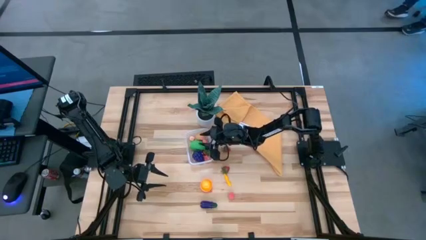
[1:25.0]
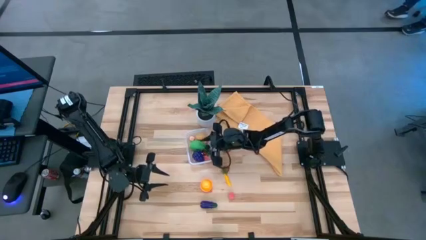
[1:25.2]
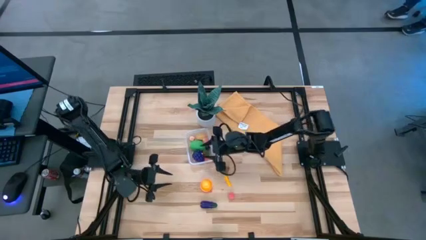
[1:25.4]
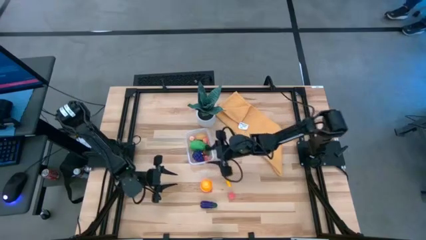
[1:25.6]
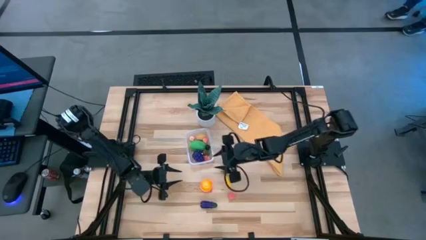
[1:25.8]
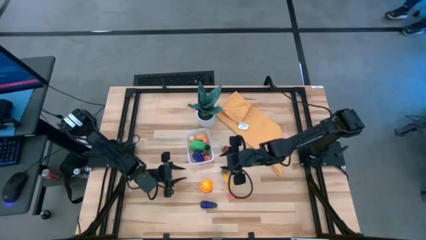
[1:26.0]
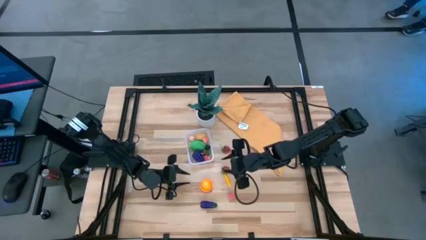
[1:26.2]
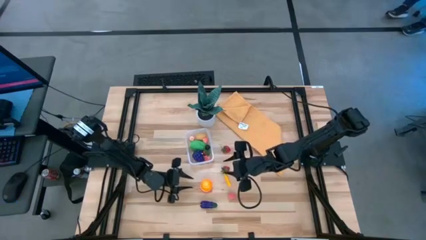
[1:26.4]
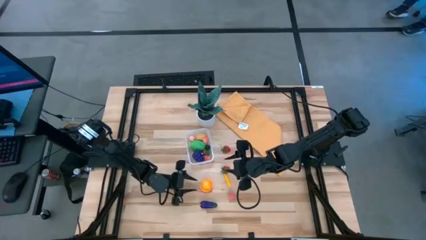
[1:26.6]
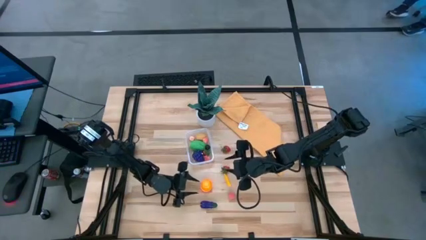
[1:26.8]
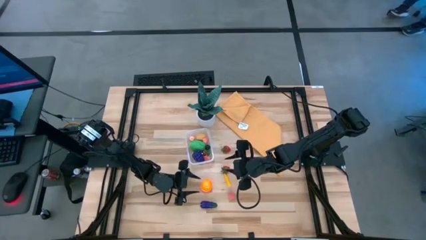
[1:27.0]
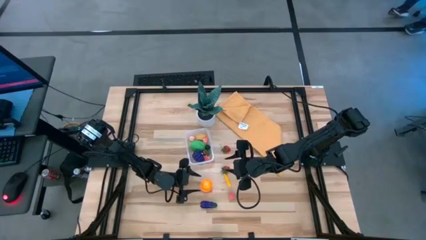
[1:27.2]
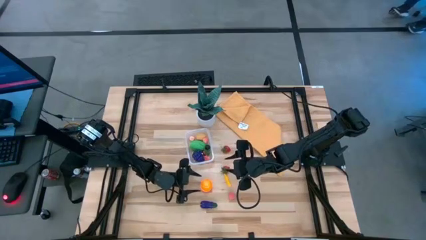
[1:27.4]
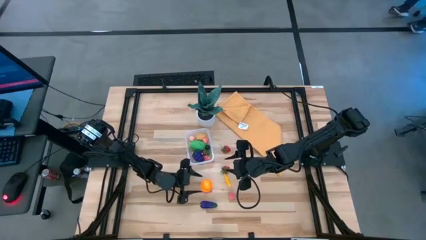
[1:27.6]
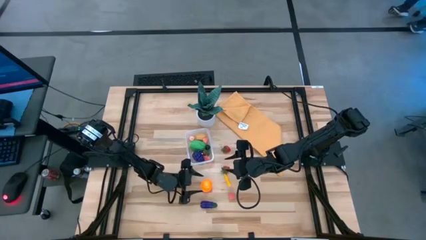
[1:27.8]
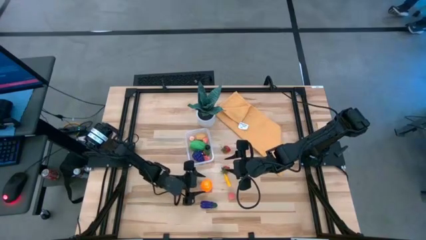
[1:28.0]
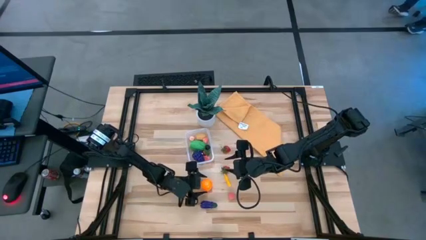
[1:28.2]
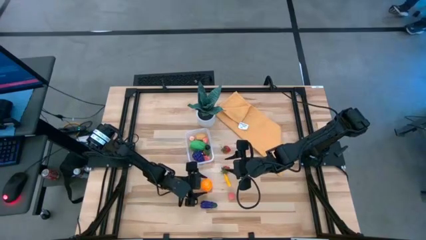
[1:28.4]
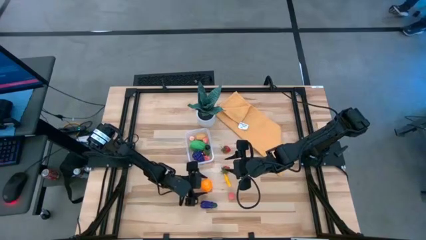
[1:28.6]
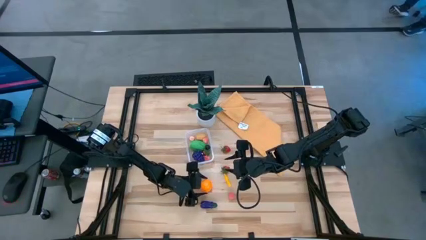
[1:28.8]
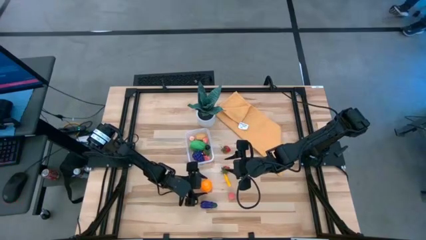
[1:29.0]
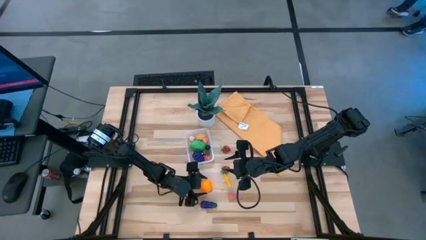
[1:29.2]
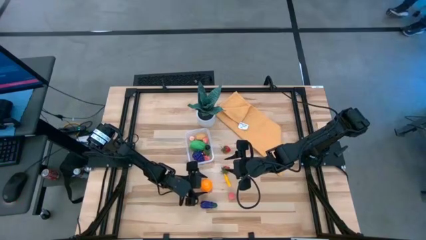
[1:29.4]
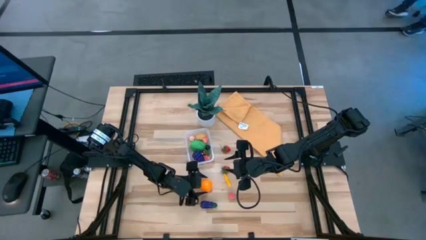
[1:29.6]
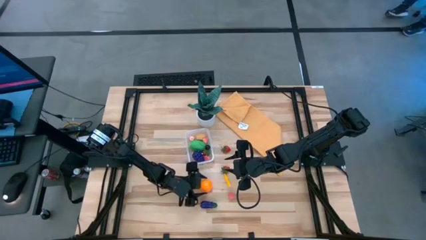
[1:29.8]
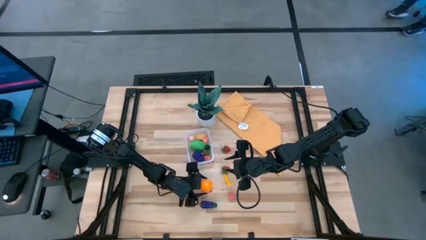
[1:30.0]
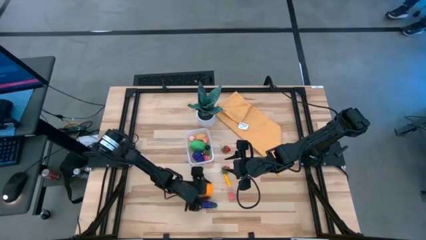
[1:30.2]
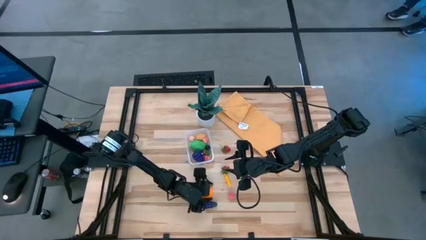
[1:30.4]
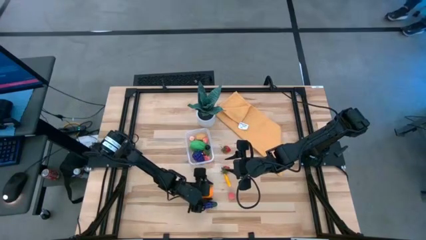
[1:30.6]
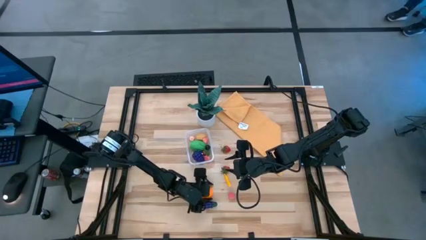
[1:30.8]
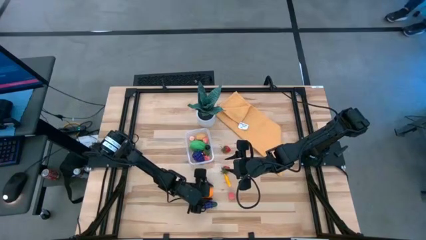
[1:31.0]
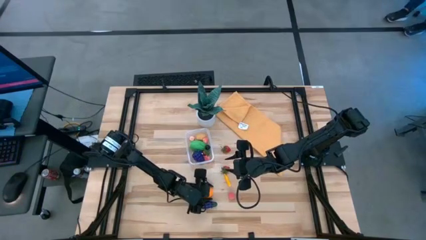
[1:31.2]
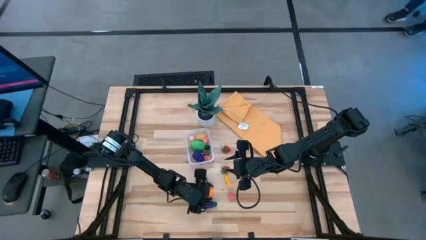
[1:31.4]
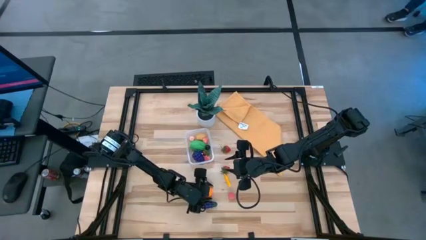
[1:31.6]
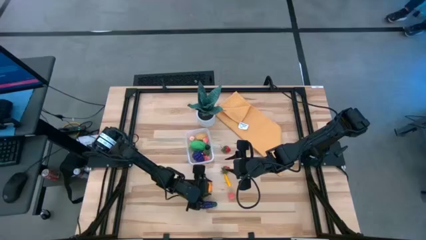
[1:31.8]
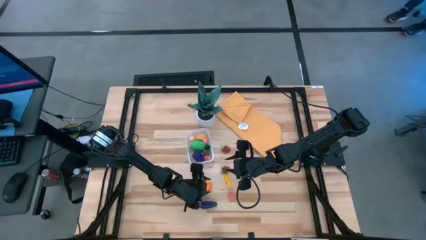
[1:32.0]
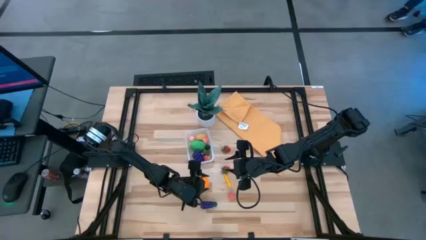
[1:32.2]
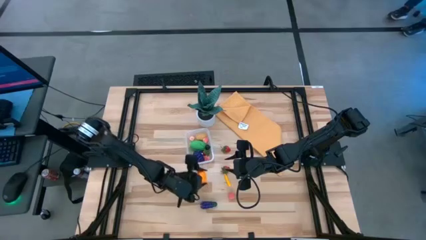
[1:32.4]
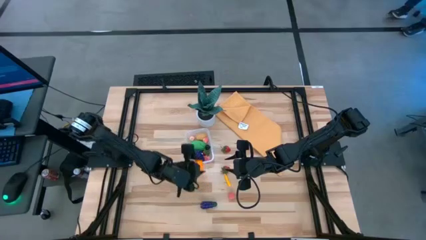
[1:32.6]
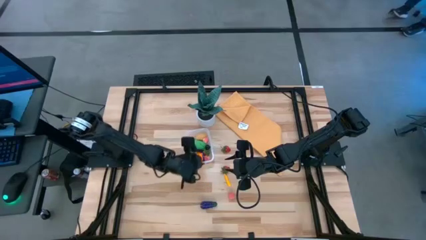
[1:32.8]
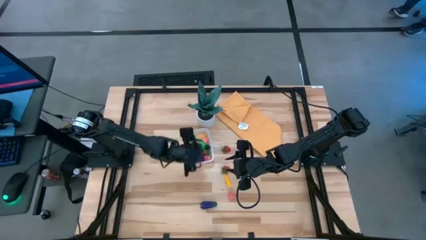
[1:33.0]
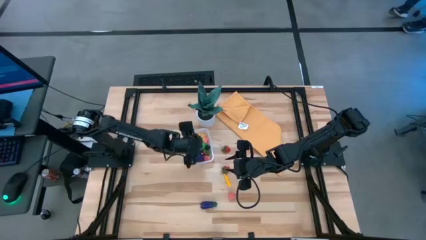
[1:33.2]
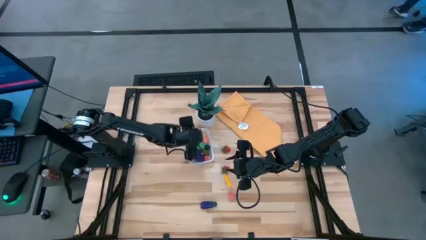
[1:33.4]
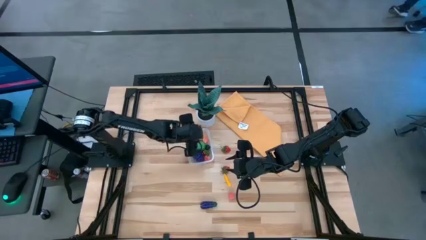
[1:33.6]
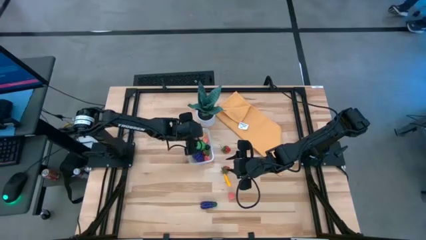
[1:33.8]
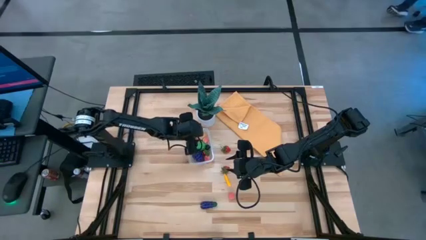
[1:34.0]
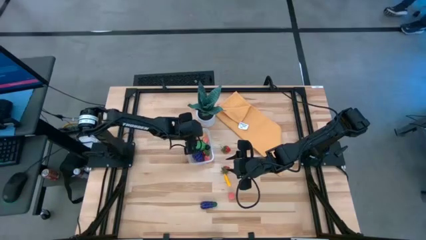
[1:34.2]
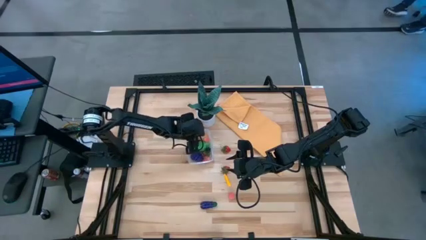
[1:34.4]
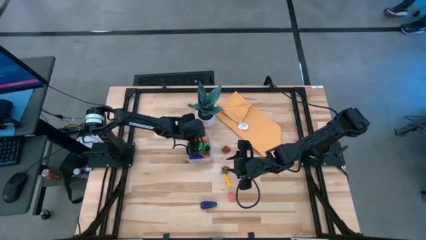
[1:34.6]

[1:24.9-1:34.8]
Task: Pick and placing Produce into tupperware
Put the orange into the transparent bin

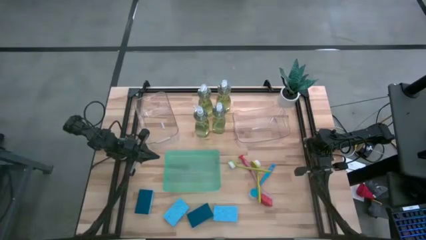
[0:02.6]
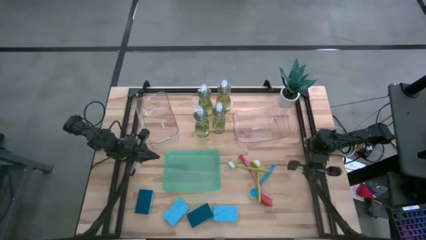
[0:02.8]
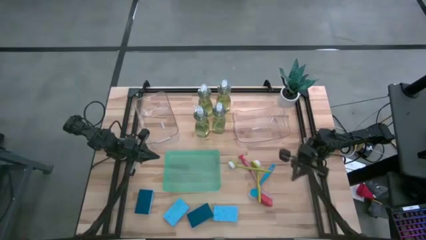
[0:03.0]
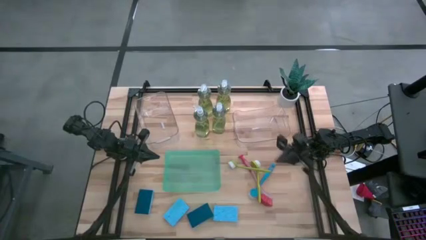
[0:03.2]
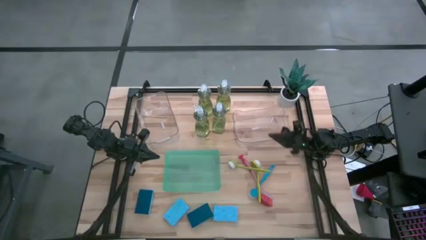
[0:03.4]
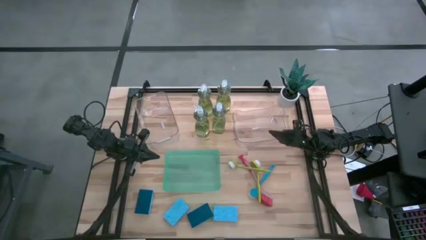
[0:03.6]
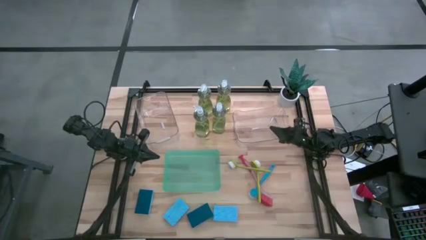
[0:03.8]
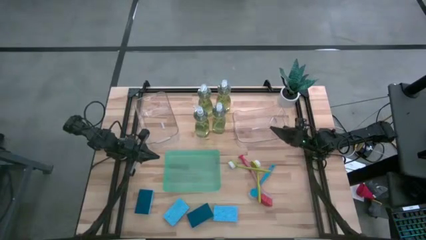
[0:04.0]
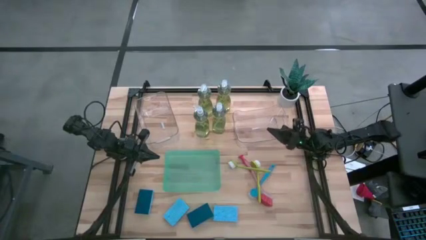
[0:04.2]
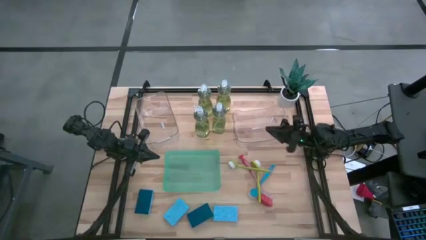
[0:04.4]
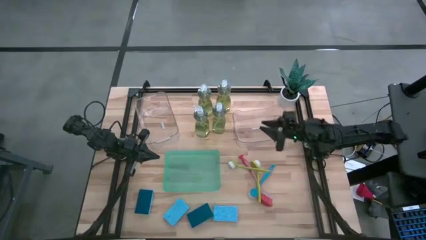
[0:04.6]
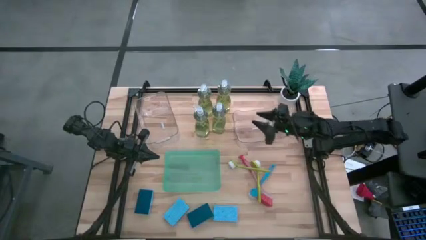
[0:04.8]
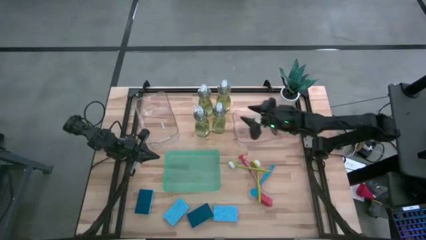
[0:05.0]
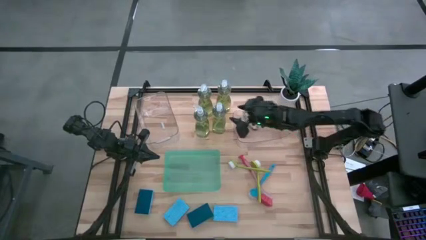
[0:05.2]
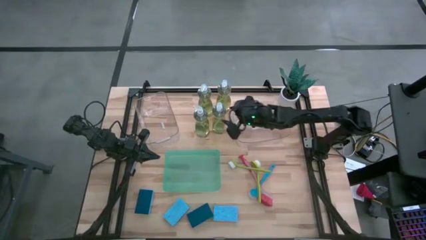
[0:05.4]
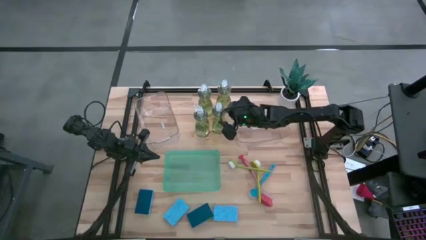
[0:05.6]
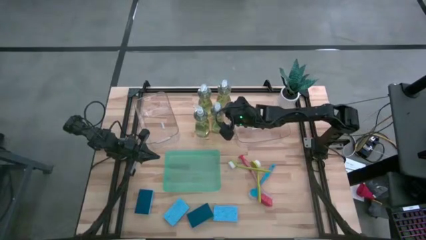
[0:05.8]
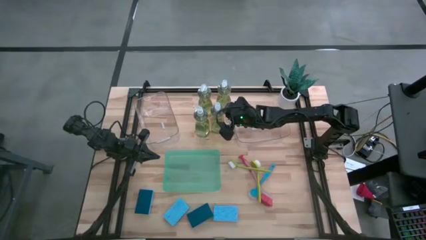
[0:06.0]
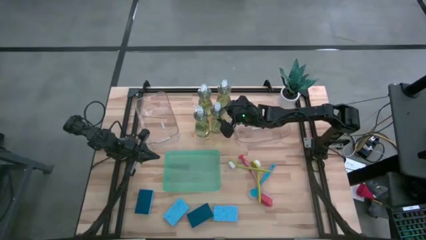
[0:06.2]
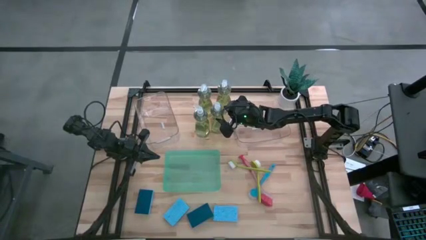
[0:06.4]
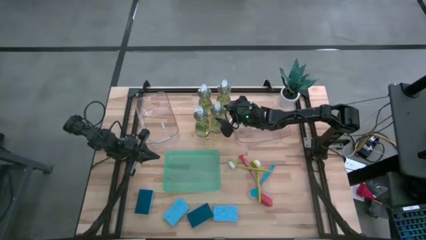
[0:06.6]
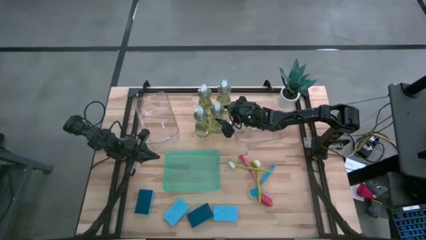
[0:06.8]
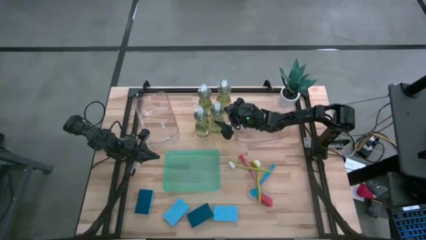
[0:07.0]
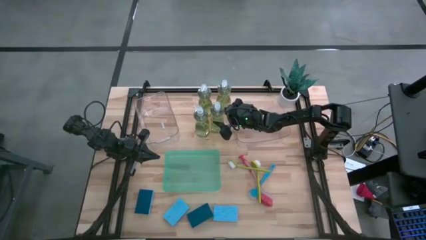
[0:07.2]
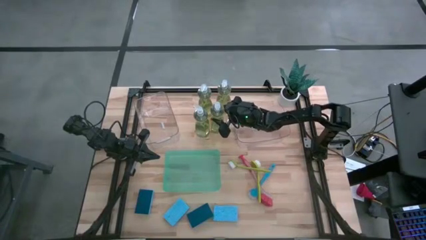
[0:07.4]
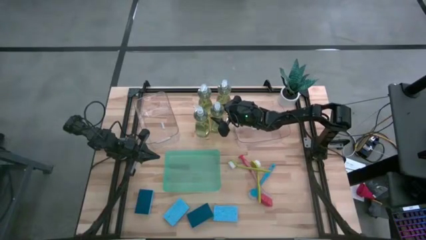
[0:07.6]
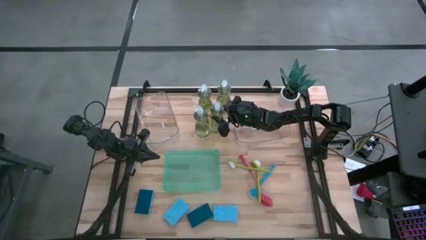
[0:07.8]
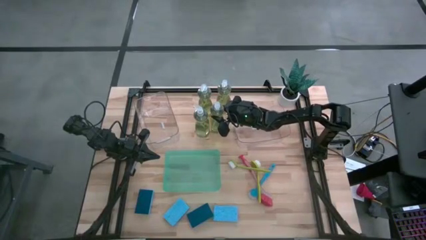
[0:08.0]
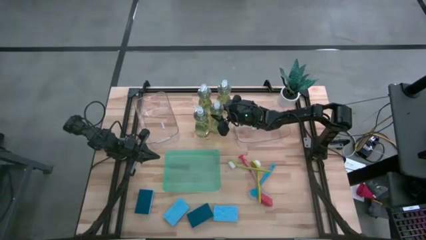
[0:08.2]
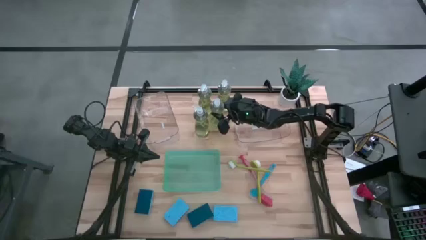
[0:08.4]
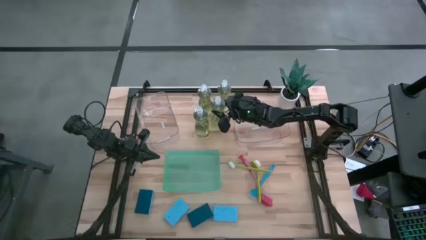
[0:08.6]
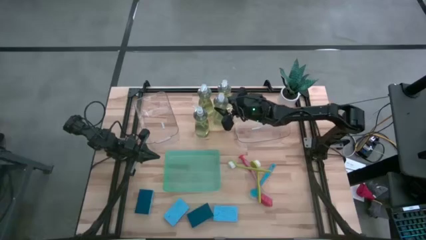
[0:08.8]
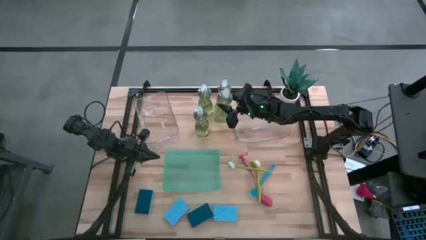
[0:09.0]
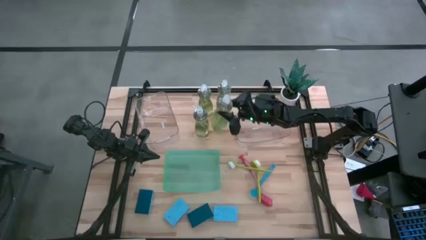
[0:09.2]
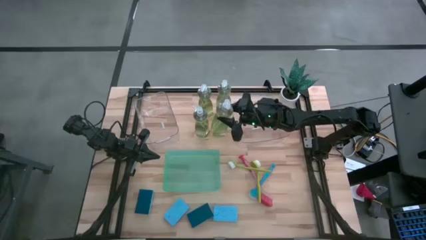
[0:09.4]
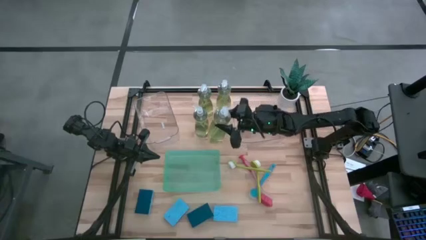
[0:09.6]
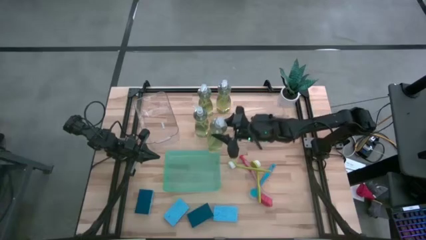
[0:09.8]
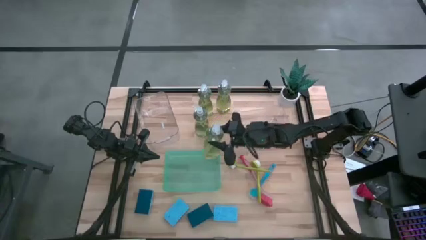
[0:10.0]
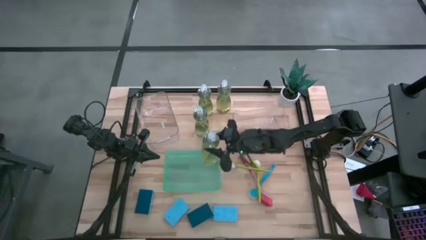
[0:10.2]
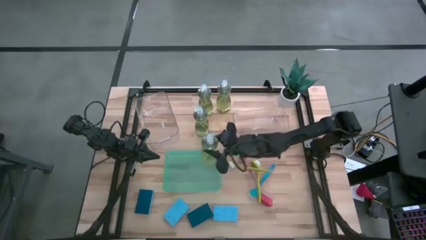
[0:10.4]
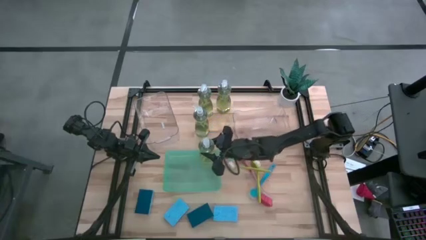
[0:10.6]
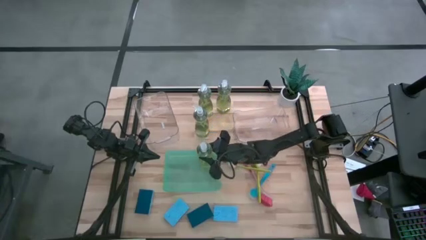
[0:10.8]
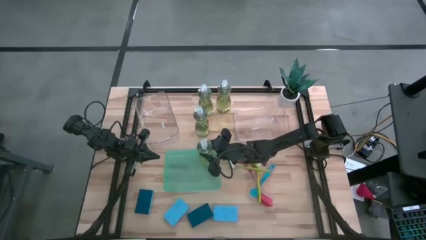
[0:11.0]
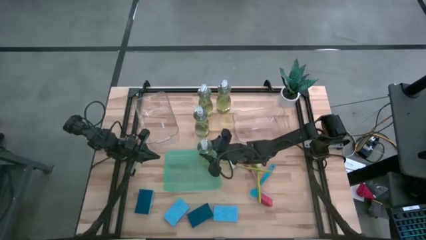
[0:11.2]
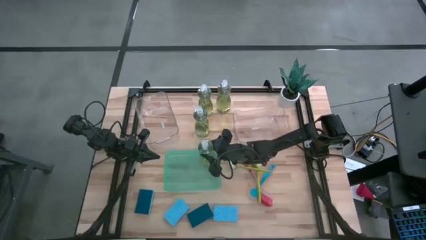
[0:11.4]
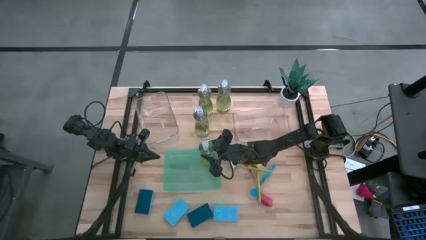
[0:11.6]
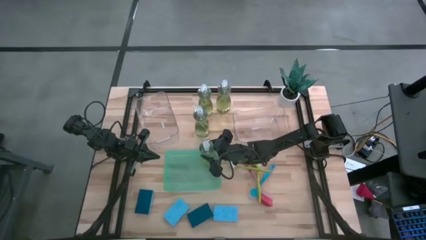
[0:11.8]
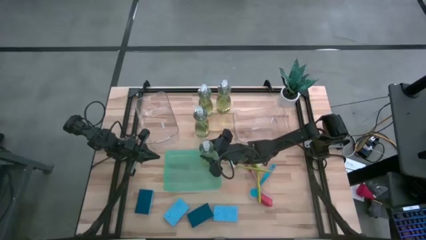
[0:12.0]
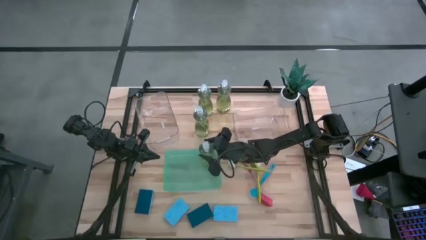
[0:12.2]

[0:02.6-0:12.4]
Task: Pick & Place Kitchen Sink Supplies
Put the green soap dispenser into the green bin
